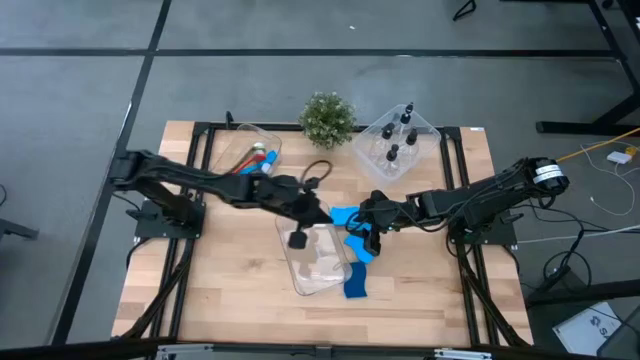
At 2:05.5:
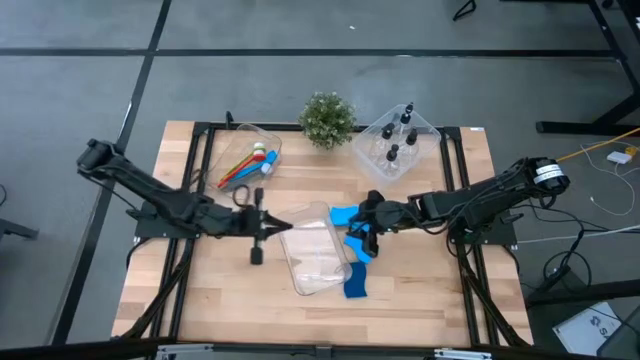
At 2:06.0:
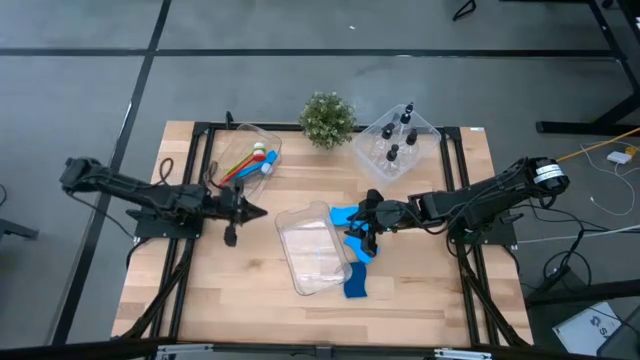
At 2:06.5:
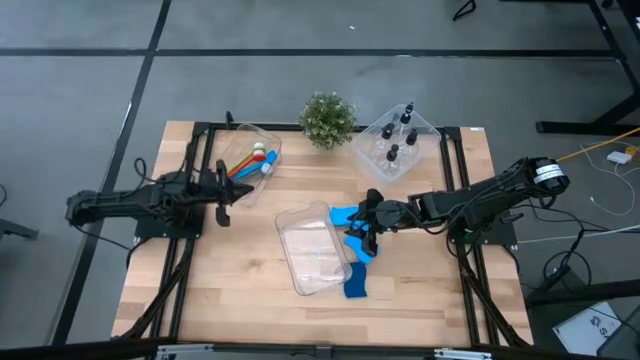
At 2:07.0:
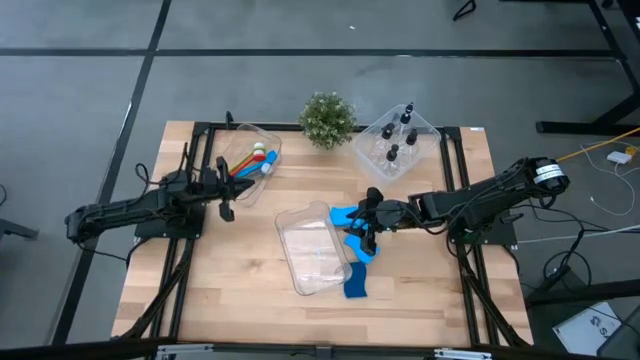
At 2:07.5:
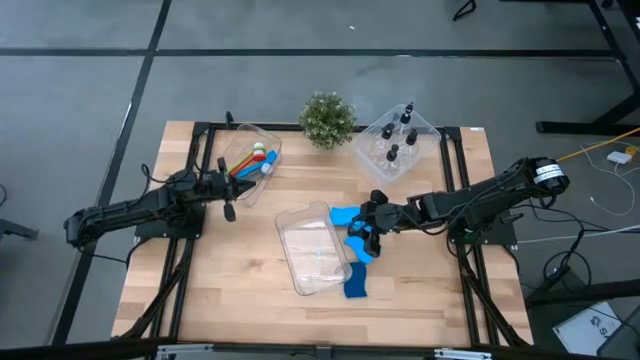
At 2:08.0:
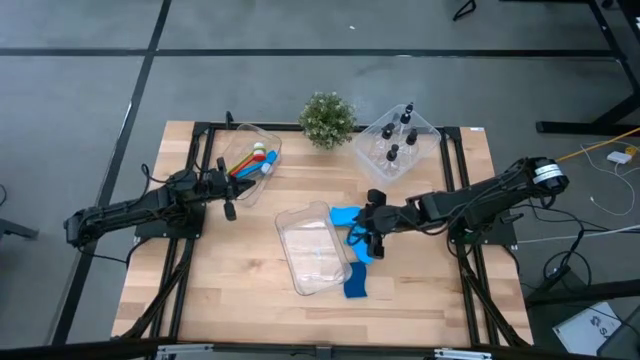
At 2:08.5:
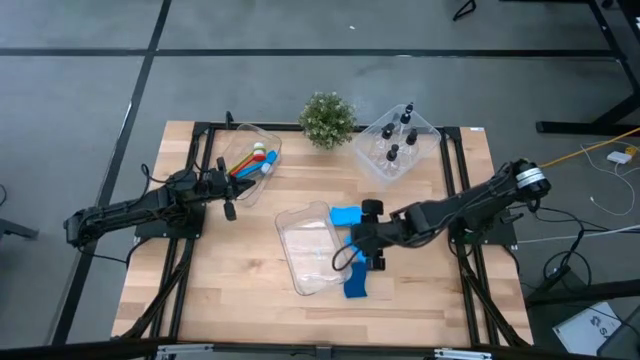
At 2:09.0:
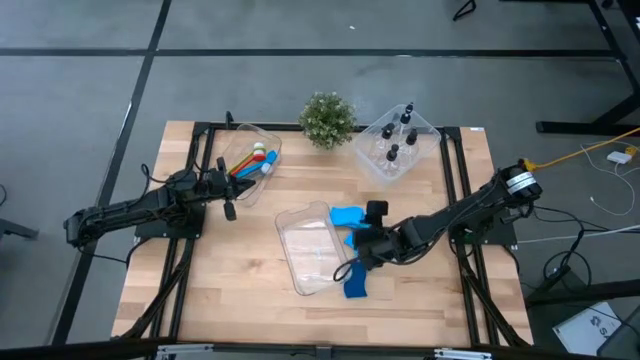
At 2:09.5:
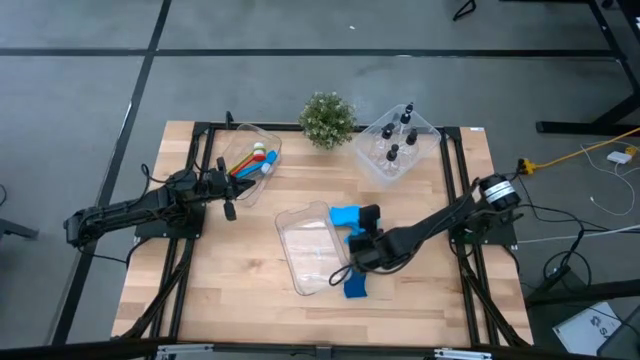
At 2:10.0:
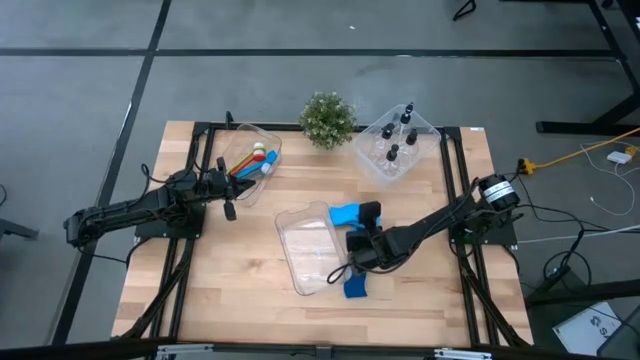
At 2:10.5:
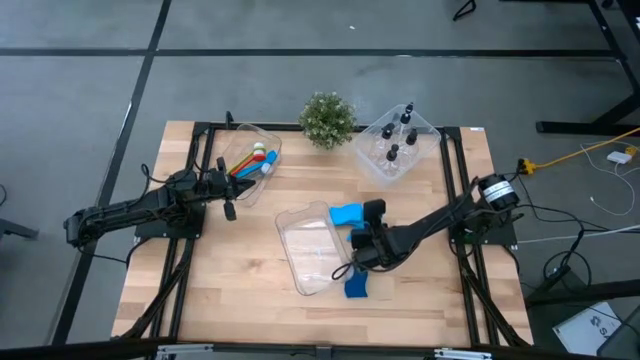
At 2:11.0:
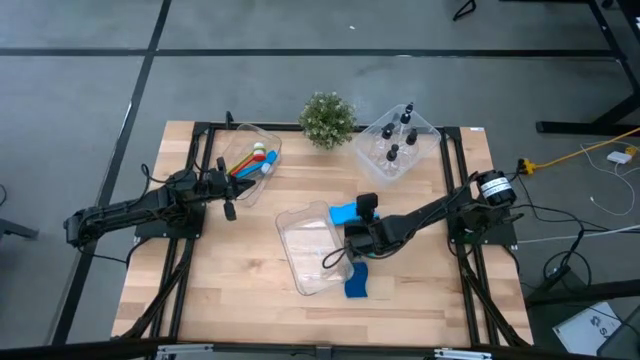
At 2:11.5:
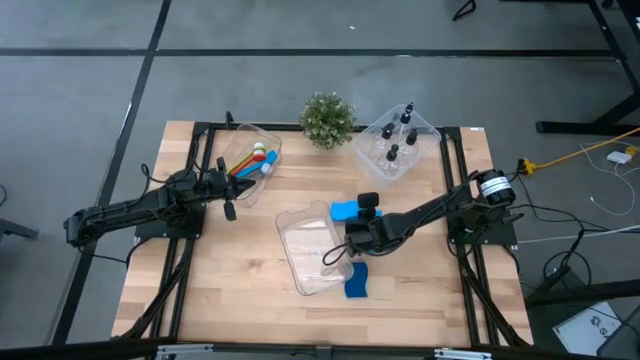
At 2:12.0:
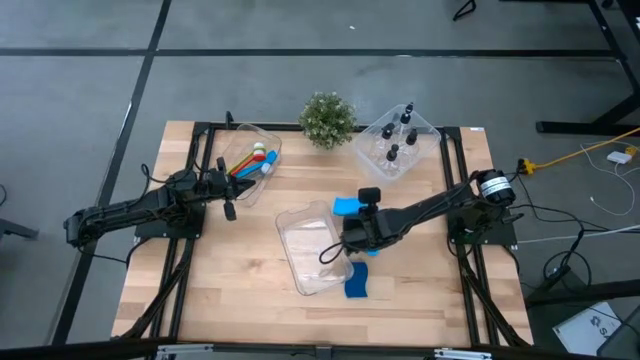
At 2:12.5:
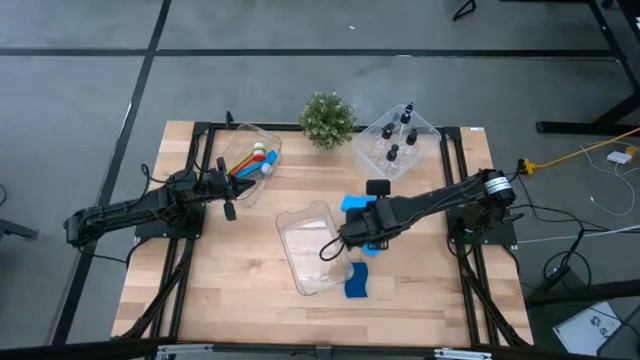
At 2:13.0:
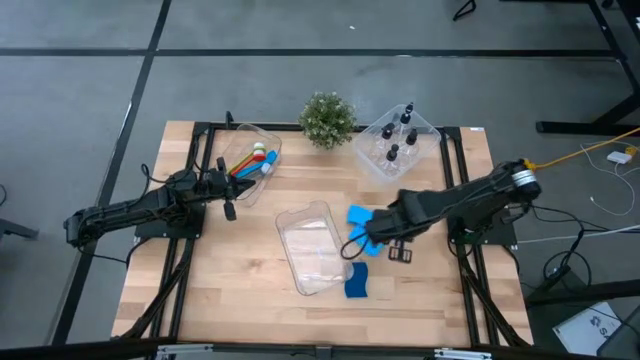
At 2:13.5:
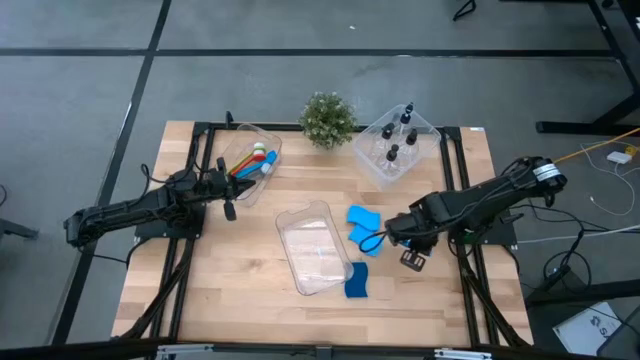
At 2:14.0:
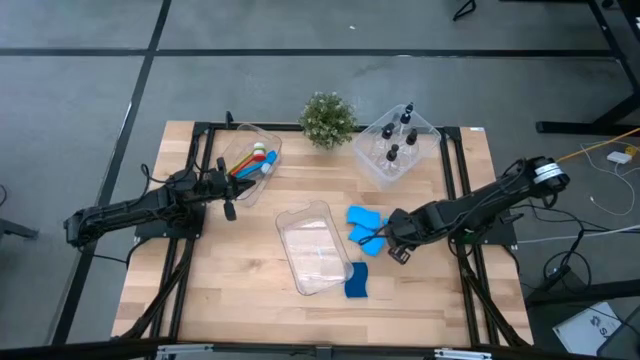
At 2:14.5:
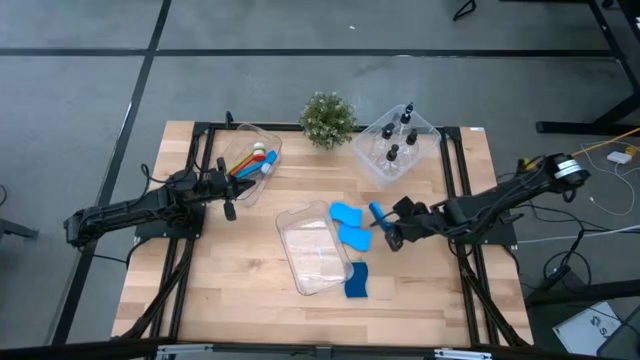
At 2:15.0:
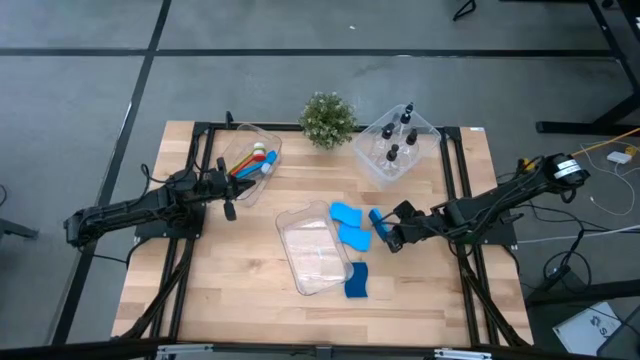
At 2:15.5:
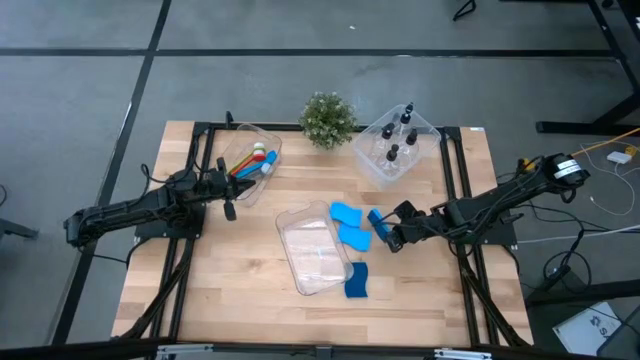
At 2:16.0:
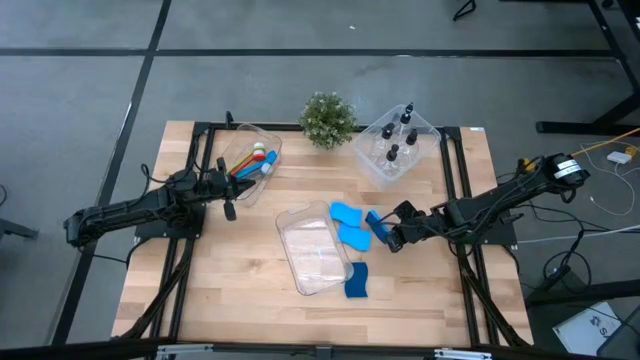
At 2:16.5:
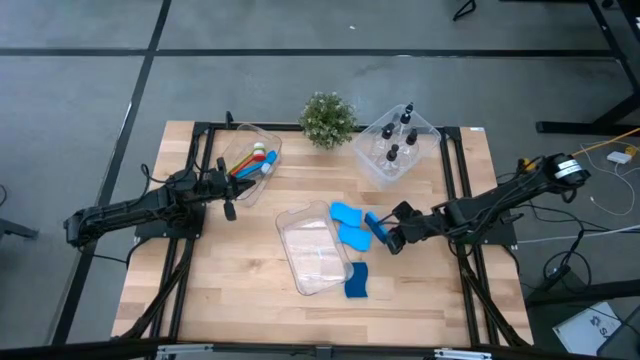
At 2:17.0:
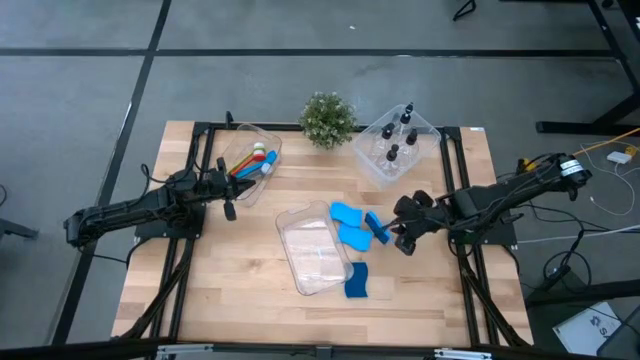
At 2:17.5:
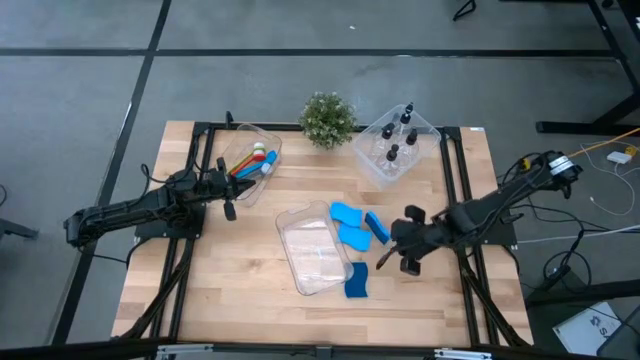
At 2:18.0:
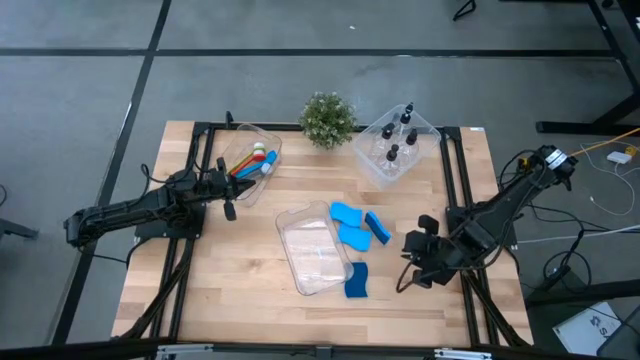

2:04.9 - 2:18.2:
Task: Pick & Place Kitchen Sink Supplies
Put the sponge into the bottom transparent bin

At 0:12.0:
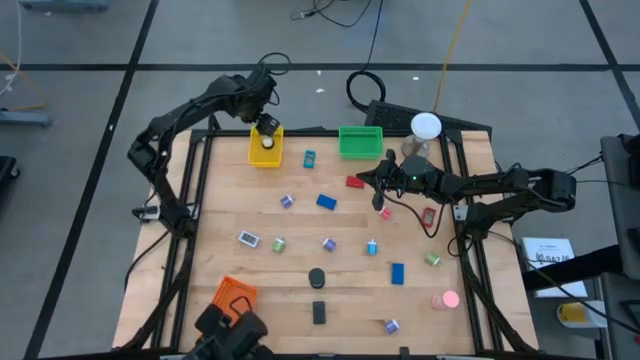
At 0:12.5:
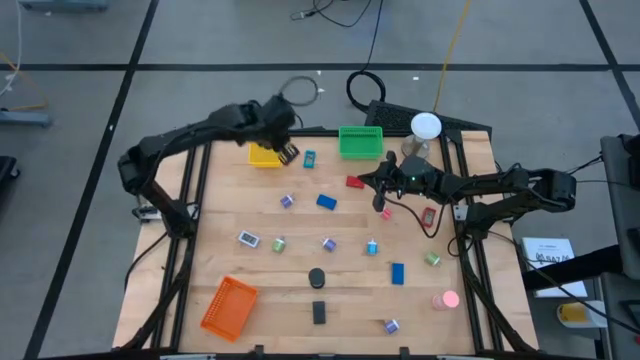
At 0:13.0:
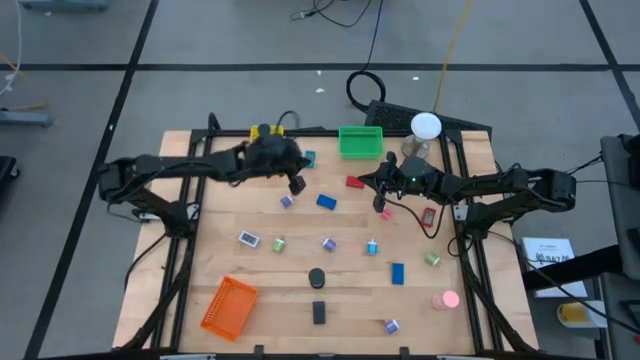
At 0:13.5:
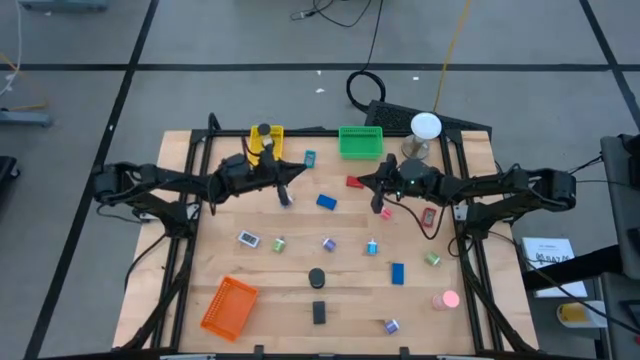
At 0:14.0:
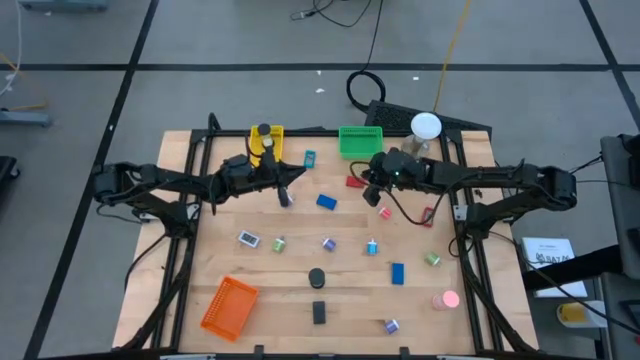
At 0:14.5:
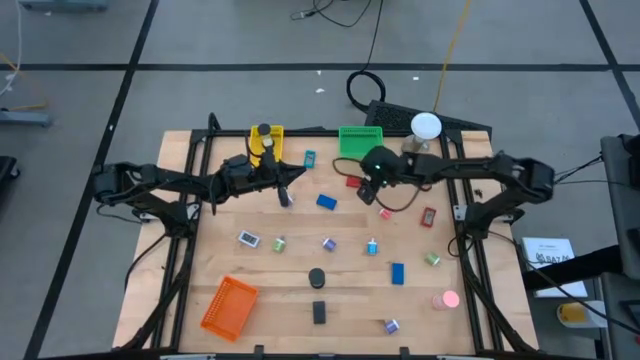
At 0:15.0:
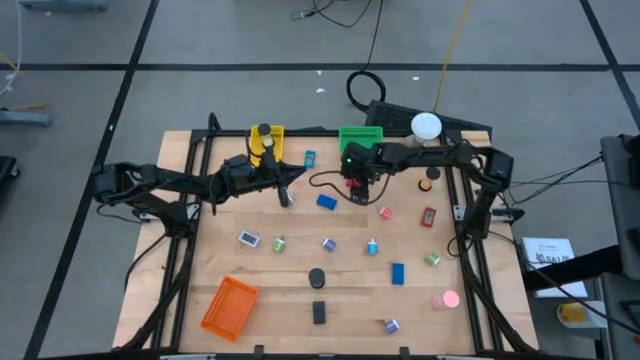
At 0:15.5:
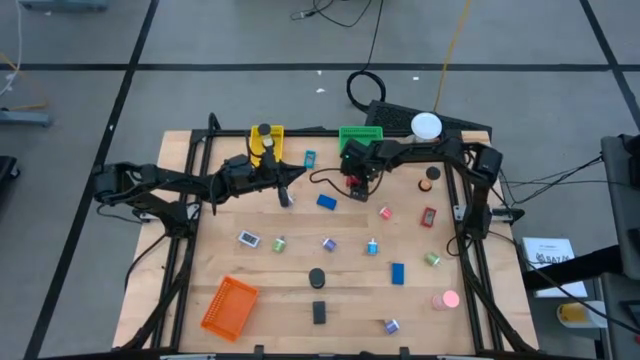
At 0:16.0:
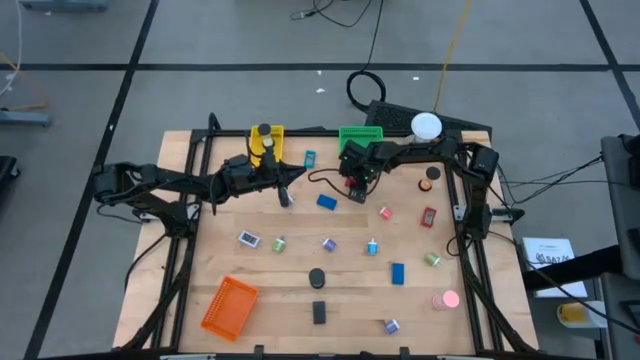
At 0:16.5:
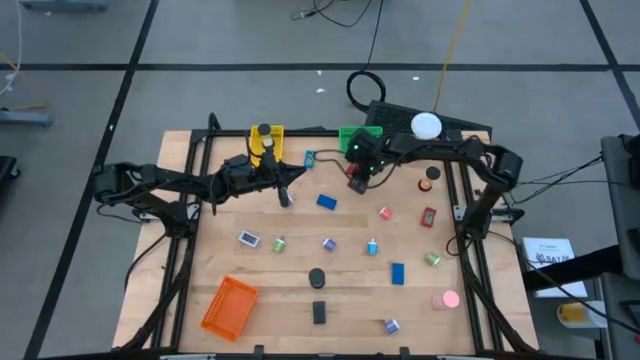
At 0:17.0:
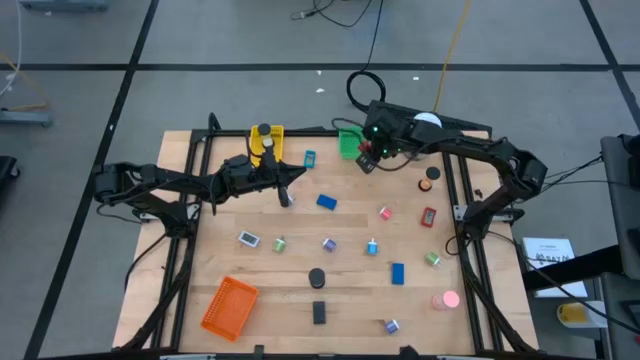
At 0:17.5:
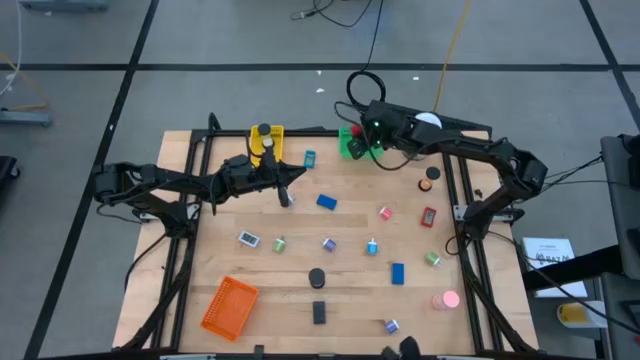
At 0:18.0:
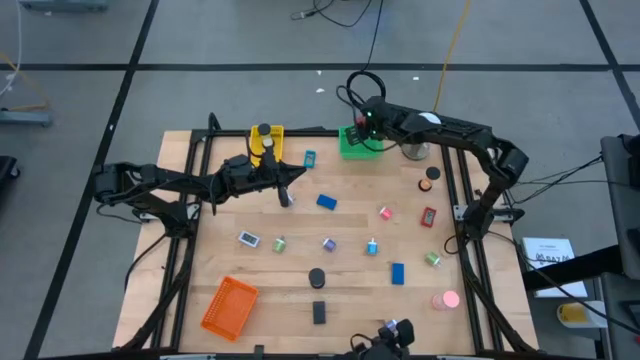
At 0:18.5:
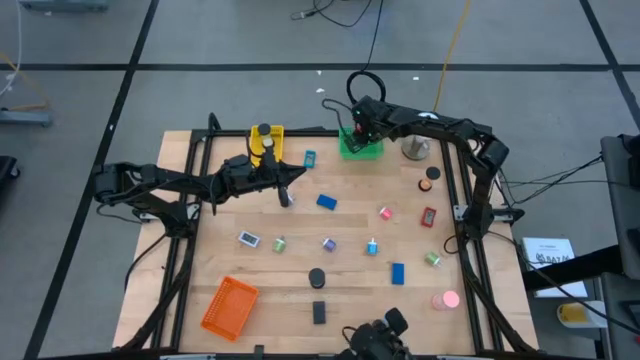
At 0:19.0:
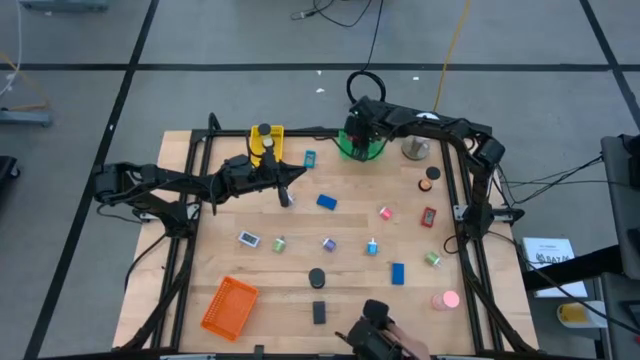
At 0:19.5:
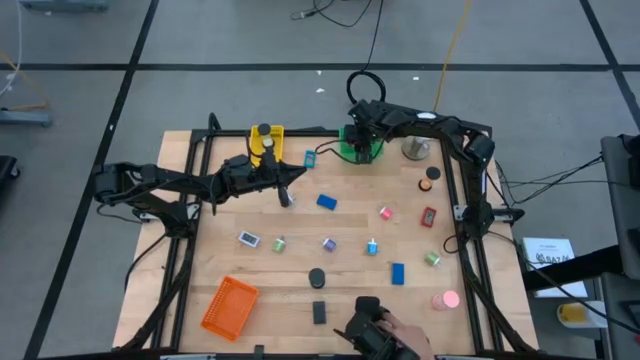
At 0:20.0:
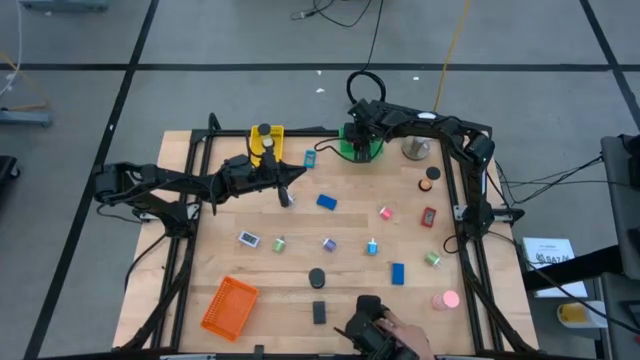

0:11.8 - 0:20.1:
Task: Pick & Place Office items
Put the left red digital clock into the green bin
